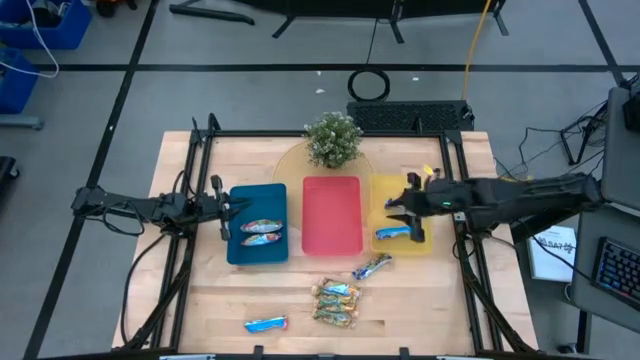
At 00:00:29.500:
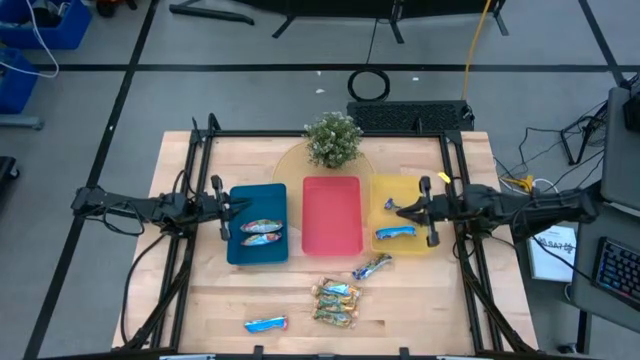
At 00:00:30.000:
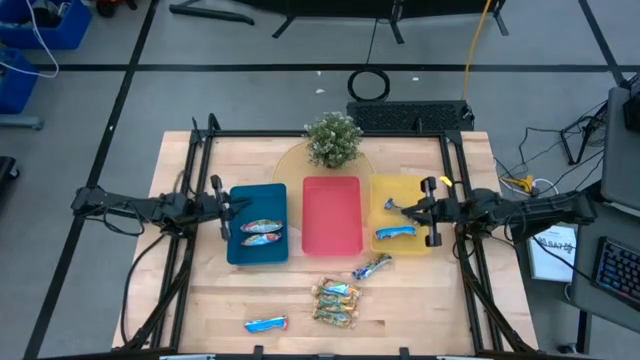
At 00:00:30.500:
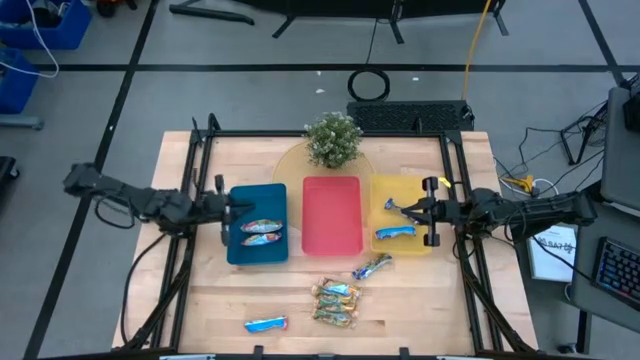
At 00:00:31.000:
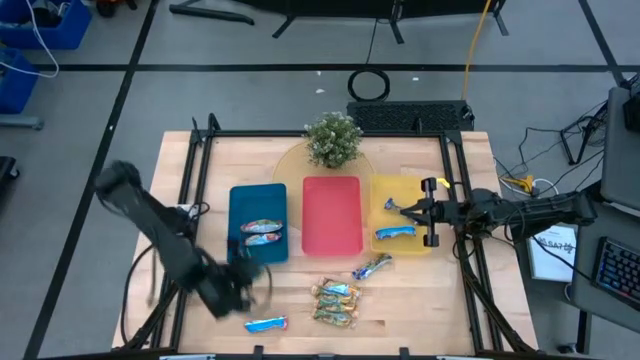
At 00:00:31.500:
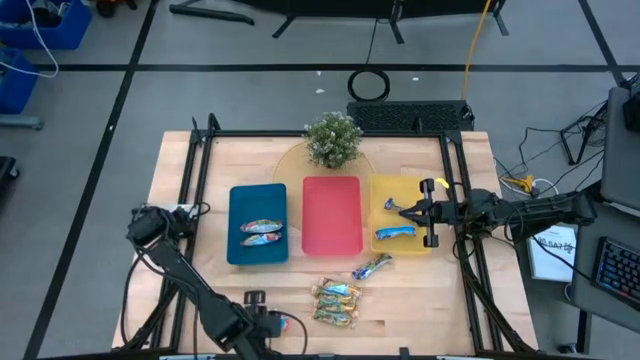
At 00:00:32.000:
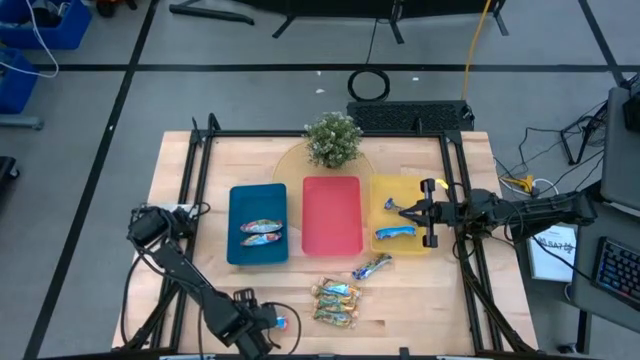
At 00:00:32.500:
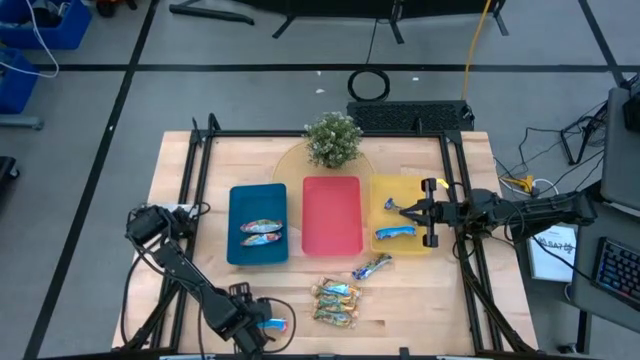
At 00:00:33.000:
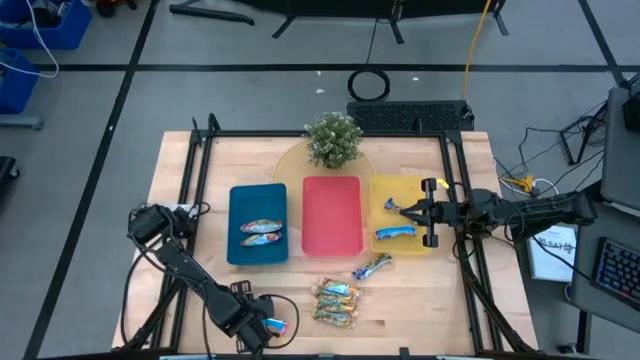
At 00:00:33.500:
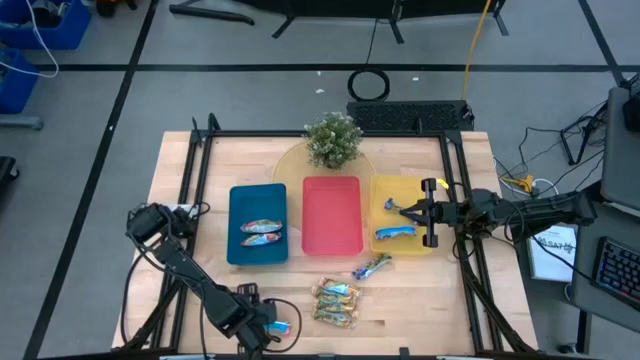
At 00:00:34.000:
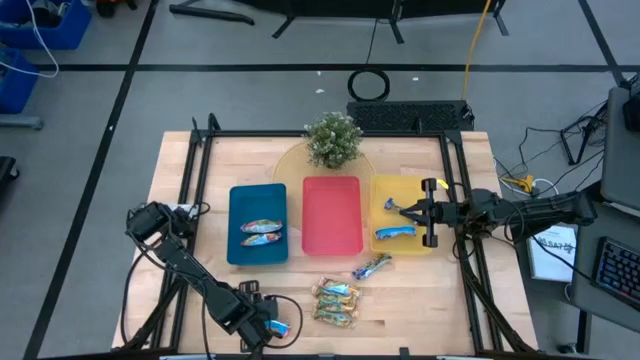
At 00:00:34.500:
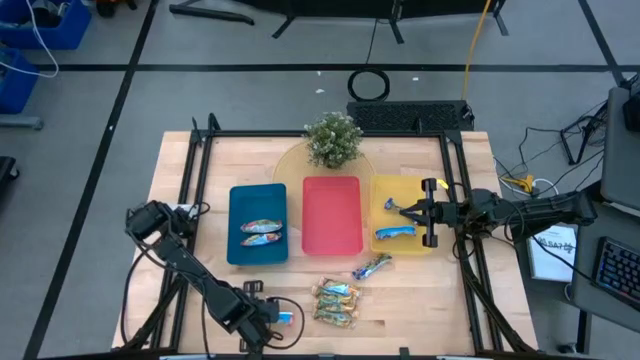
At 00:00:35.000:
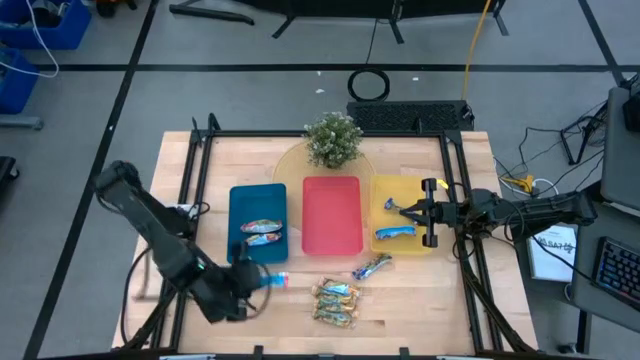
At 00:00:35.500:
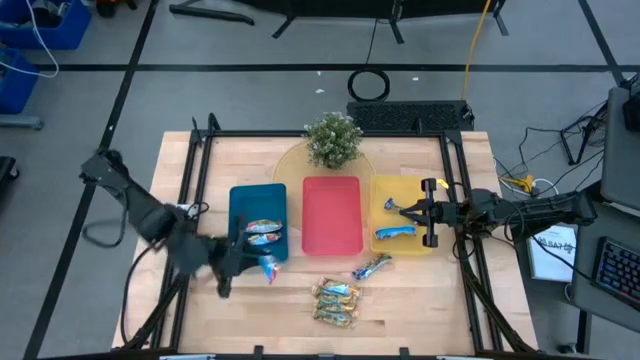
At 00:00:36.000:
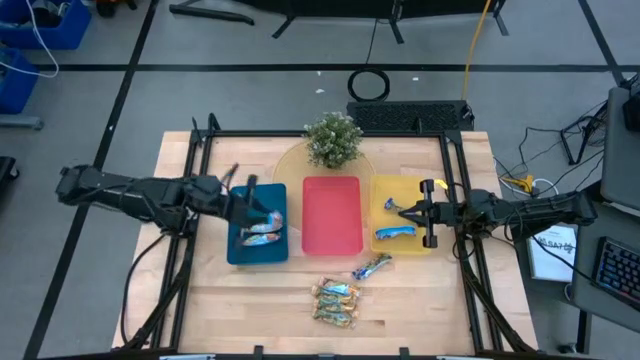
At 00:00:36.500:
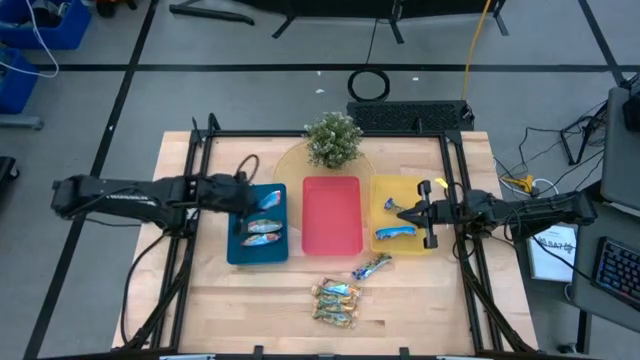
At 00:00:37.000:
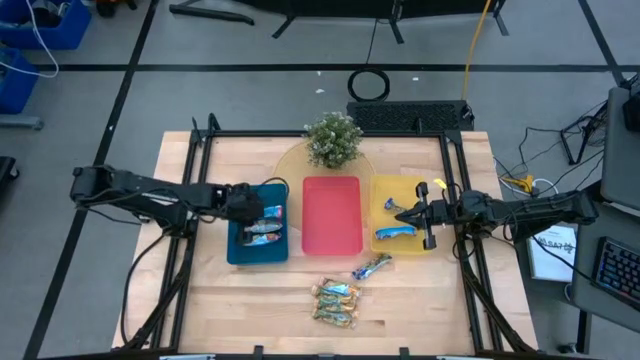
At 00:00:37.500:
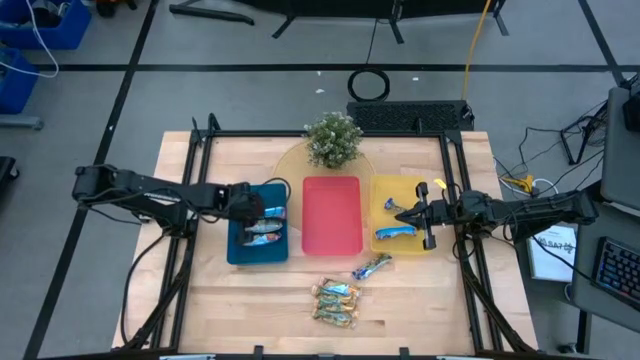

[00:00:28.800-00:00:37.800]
Task: Pick and place Granola Bars by type
Put the red granola bar into the blue bin

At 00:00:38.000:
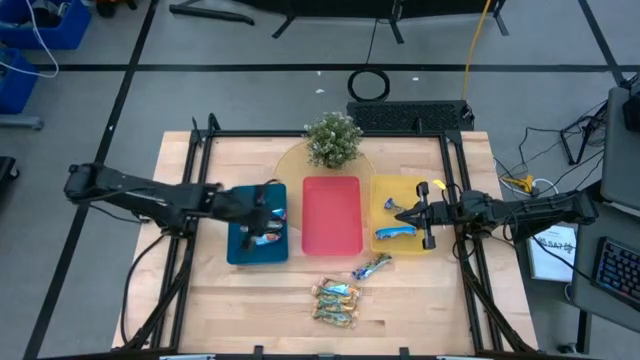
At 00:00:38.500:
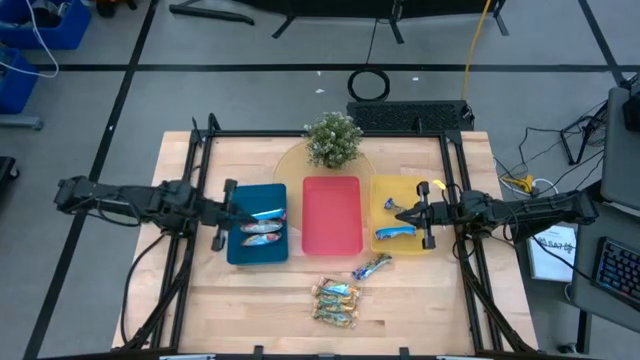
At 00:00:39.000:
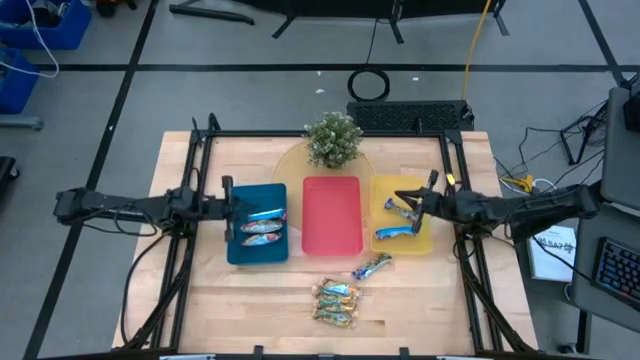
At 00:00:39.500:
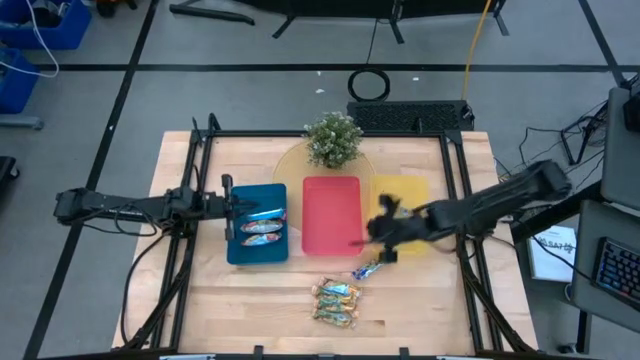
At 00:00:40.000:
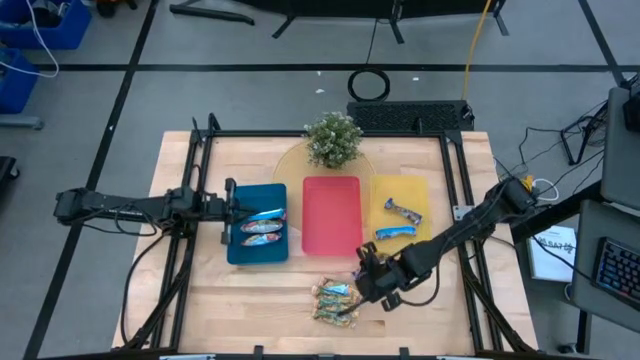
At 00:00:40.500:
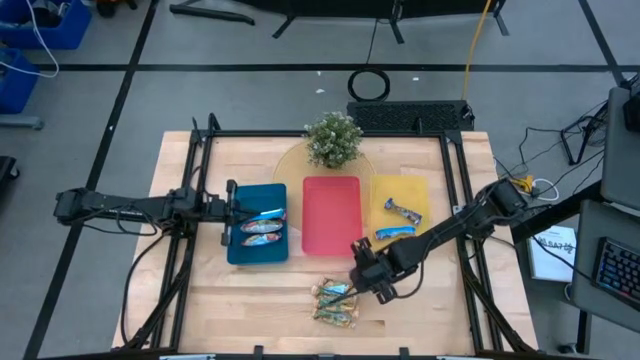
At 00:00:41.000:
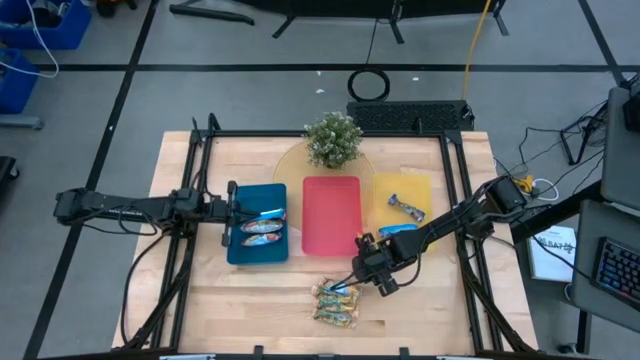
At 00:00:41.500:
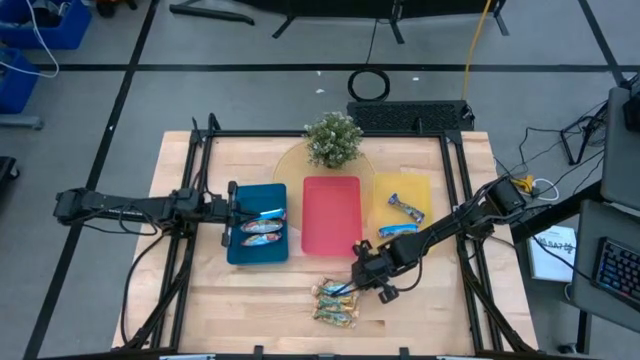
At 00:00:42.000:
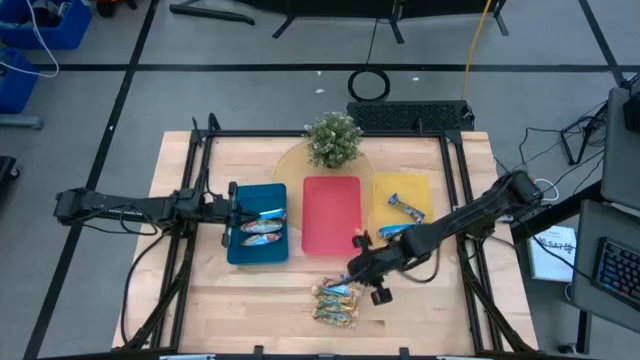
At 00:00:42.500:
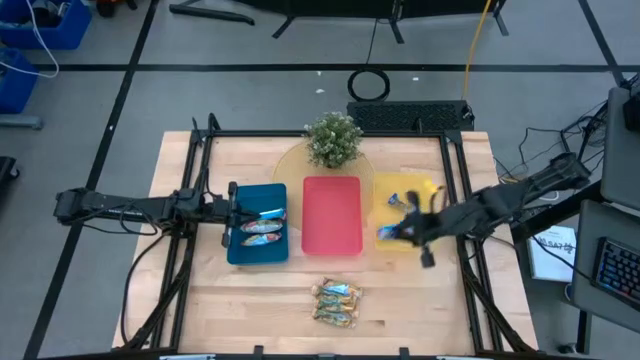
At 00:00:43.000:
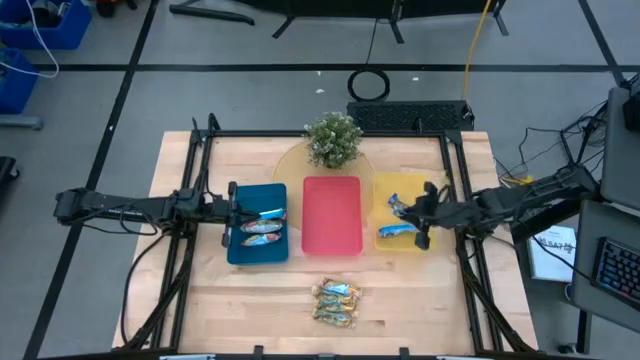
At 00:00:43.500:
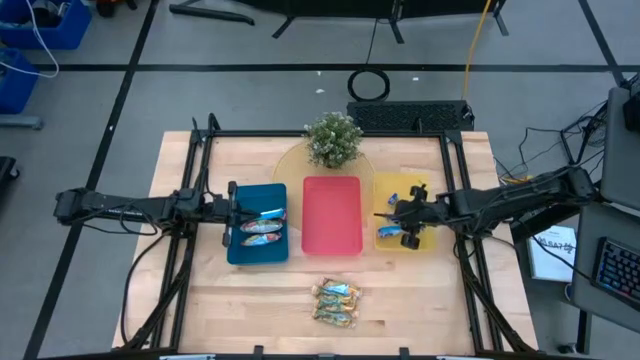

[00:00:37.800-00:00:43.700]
Put the blue granola bar into the yellow bin

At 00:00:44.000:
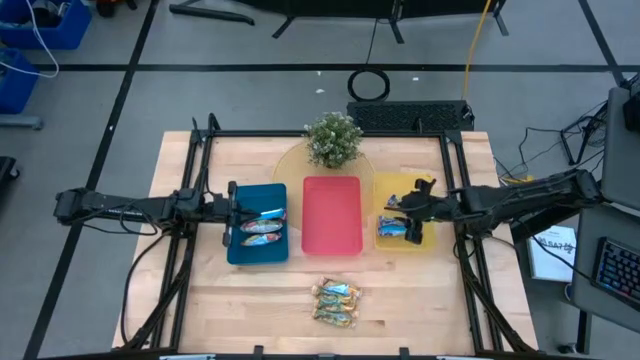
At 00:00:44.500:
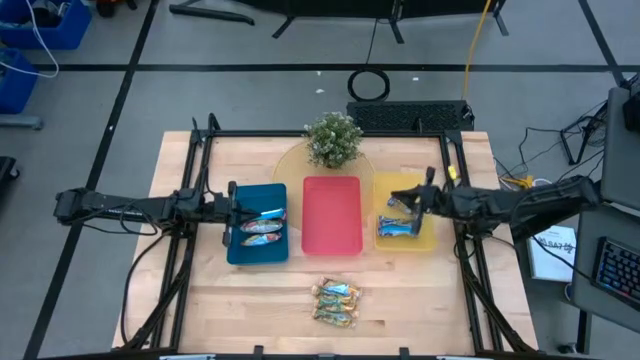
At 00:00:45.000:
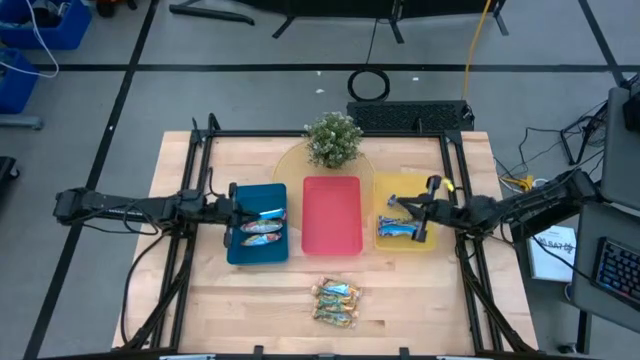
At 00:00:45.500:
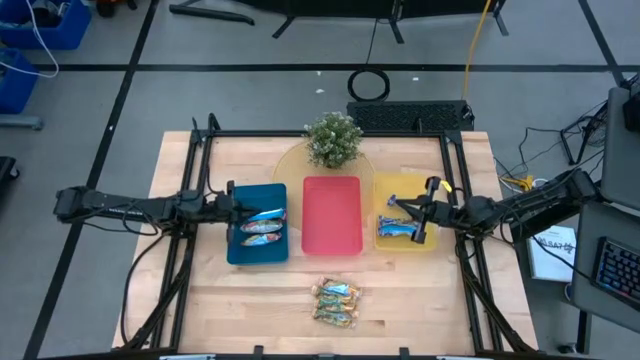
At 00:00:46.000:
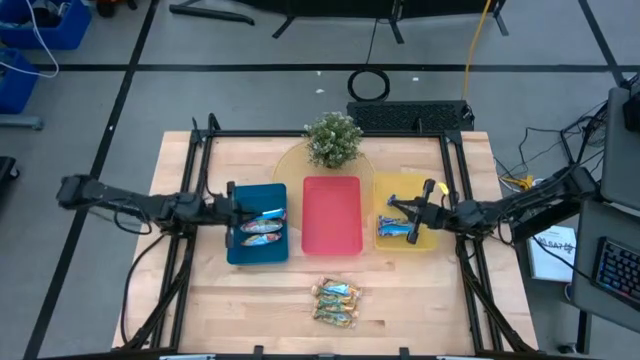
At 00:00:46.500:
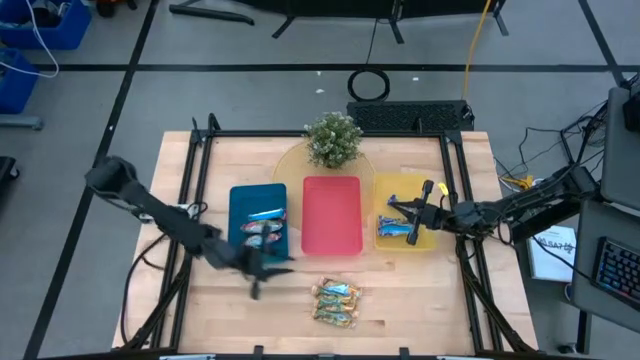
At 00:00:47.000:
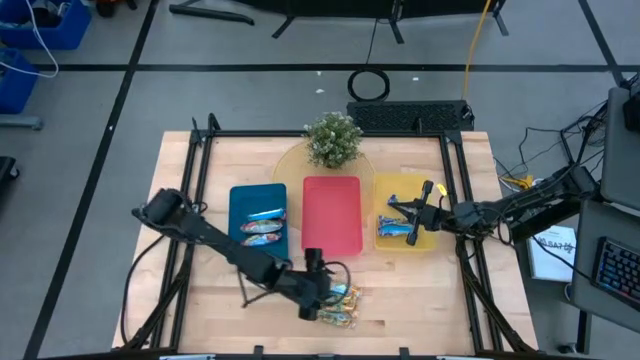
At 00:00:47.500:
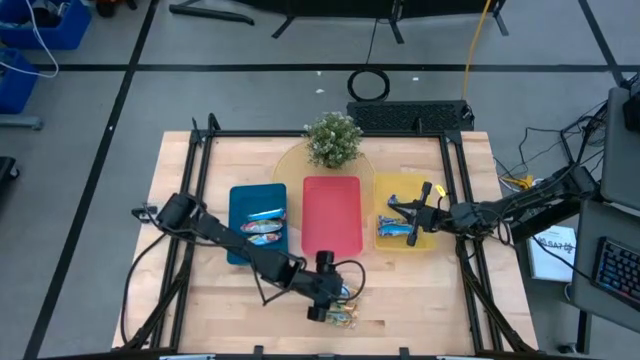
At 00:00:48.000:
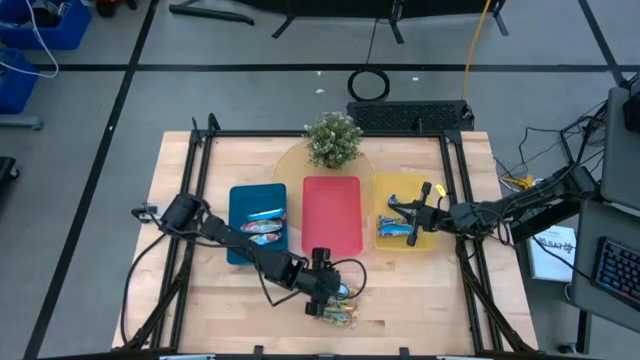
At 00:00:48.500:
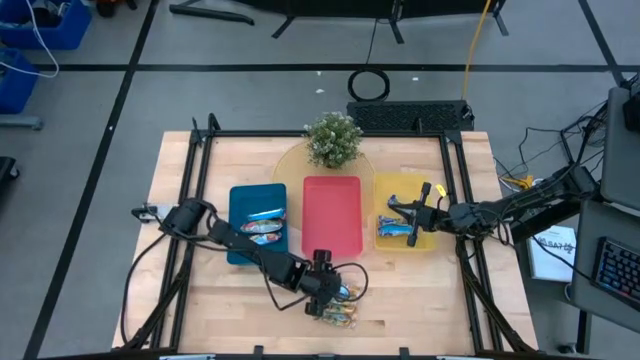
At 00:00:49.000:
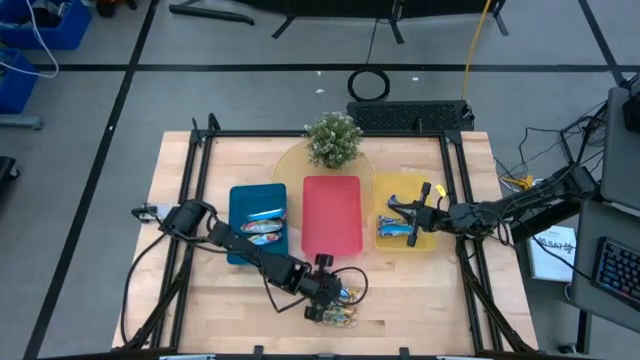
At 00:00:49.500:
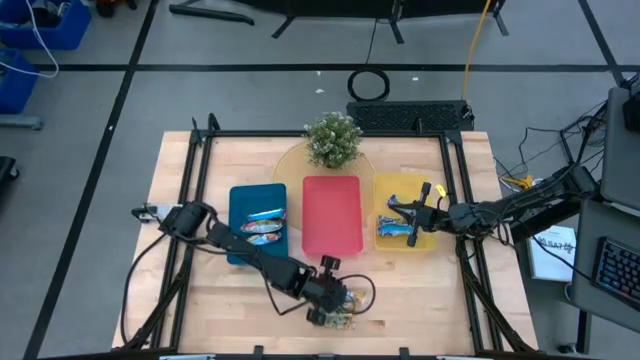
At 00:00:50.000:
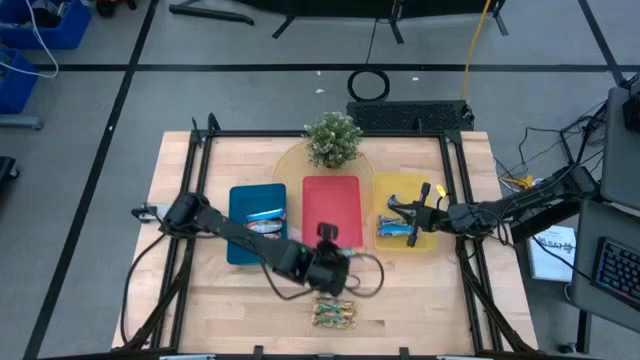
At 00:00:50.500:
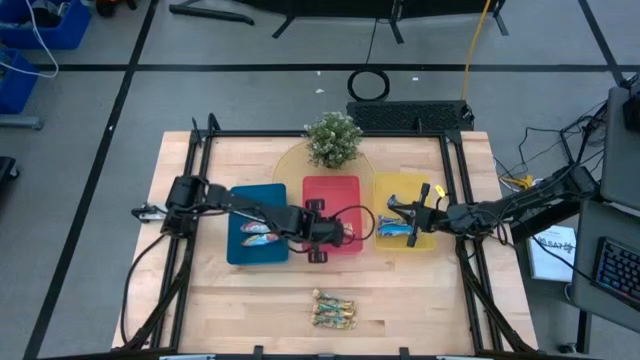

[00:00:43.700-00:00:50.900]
Put the yellow granola bar into the red bin
